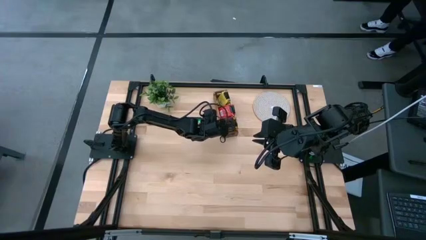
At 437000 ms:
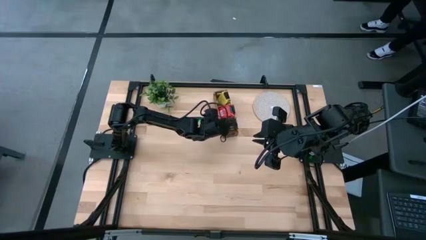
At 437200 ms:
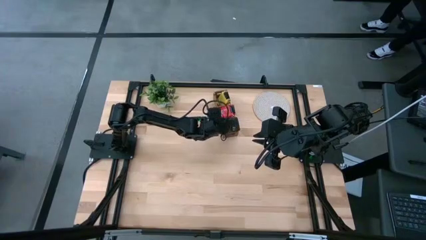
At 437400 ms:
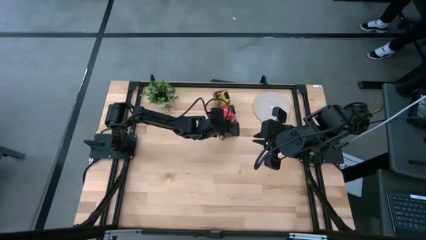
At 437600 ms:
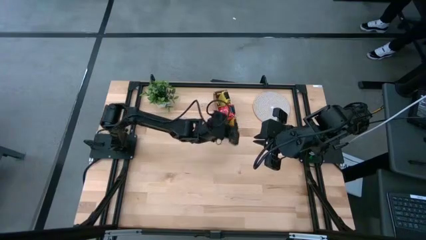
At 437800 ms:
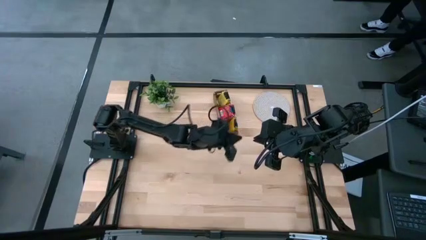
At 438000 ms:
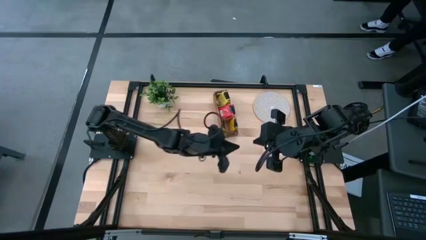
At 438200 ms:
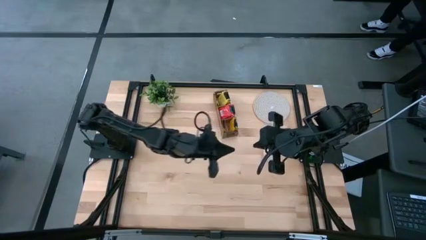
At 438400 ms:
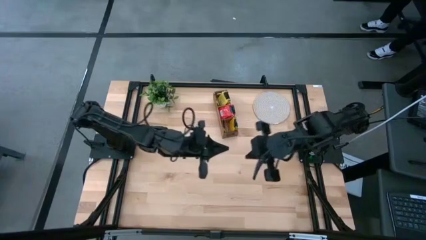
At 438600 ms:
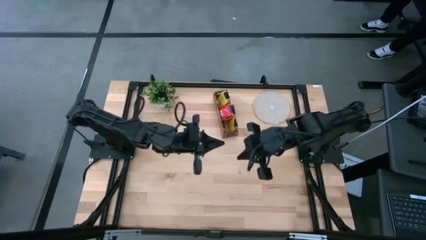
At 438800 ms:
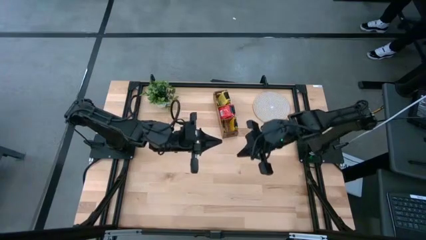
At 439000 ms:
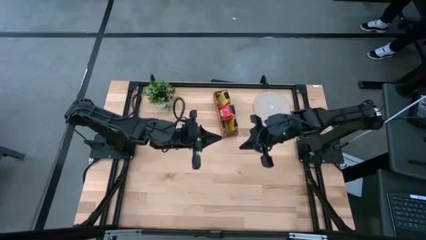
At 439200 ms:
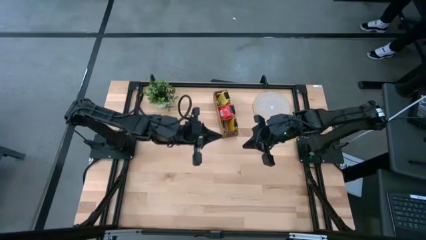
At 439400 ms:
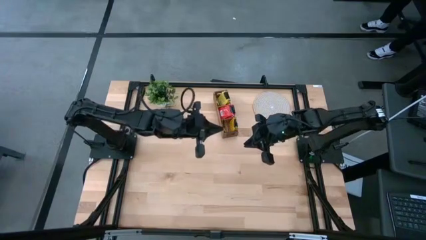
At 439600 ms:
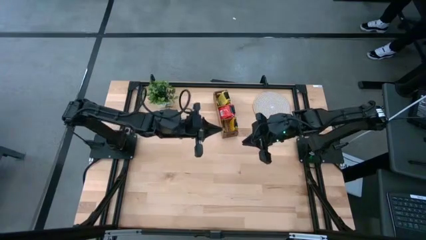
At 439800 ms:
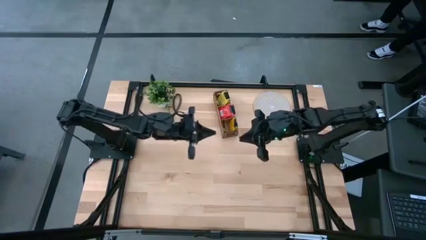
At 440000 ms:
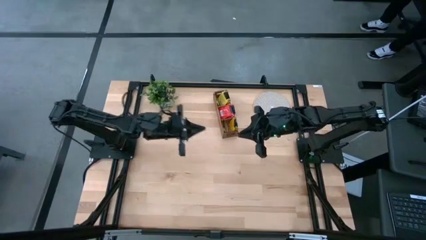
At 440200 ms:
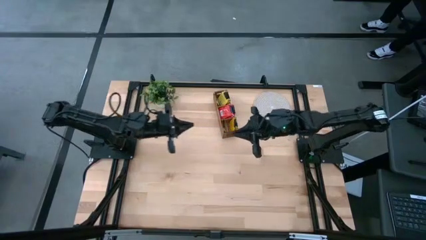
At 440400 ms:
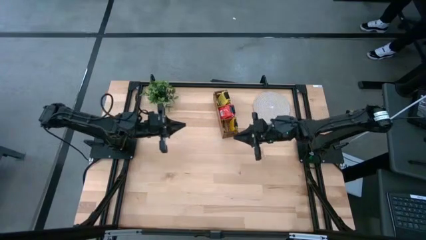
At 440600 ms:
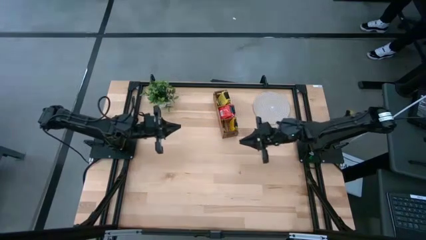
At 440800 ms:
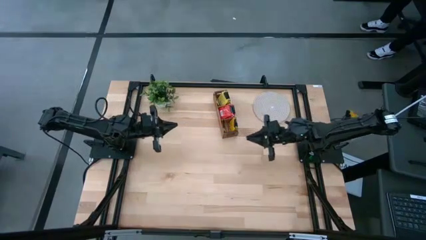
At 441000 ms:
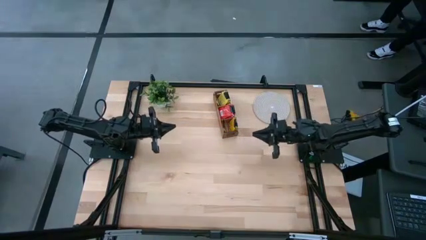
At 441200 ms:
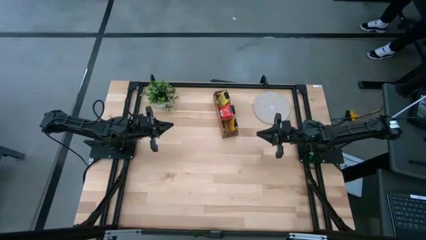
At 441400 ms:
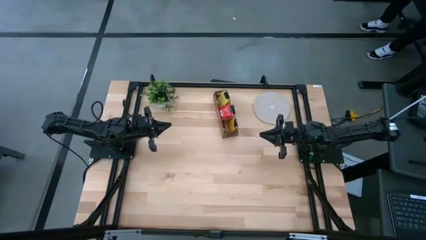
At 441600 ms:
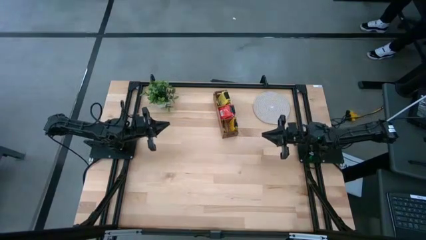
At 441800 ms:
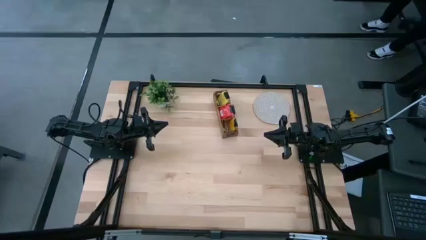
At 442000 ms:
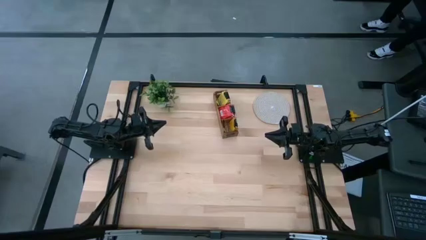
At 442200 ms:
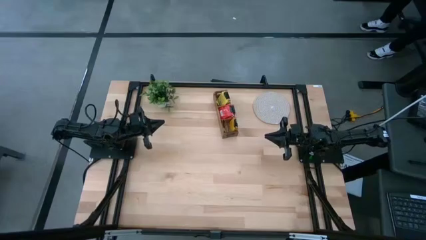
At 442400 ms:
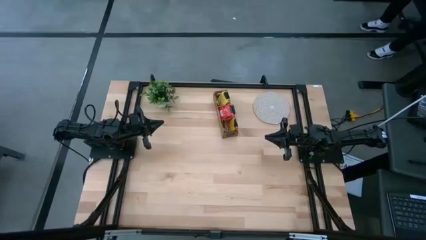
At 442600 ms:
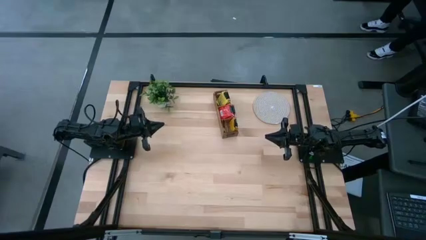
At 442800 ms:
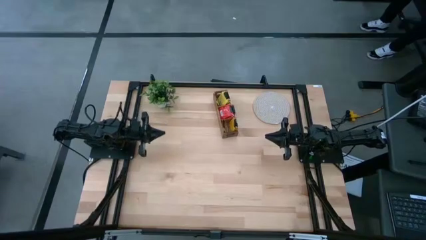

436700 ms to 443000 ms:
Task: Pick & Place Tea
Return to Home Position

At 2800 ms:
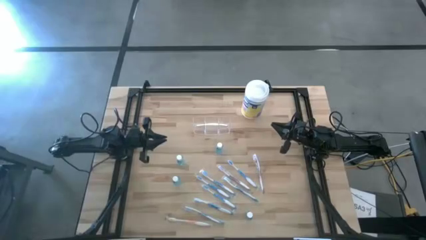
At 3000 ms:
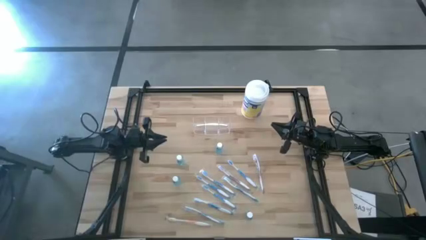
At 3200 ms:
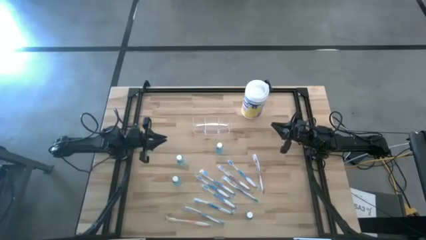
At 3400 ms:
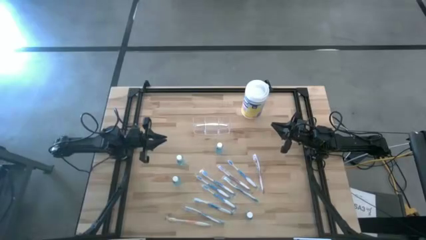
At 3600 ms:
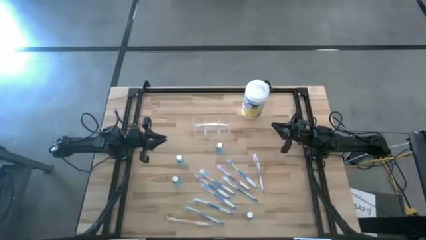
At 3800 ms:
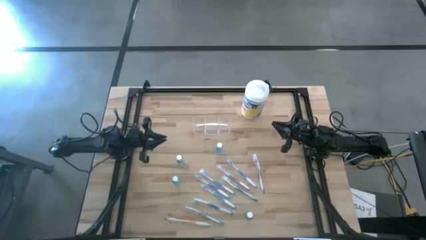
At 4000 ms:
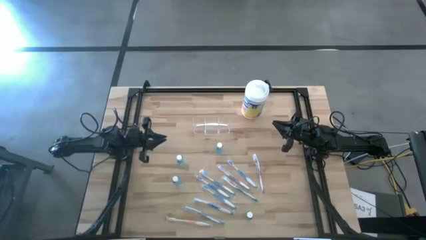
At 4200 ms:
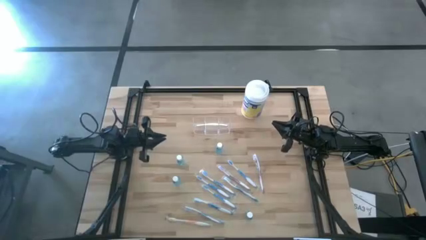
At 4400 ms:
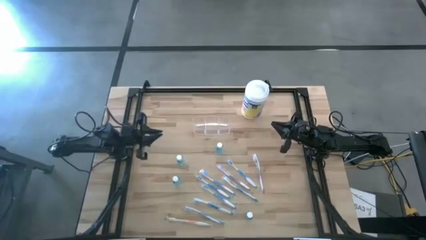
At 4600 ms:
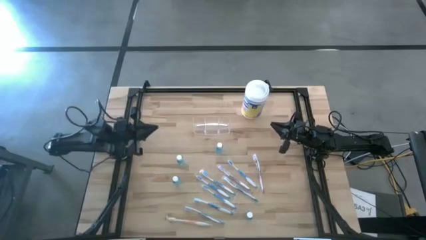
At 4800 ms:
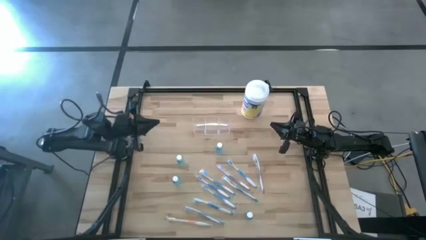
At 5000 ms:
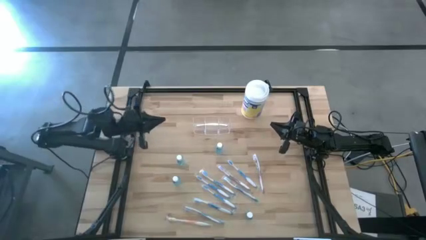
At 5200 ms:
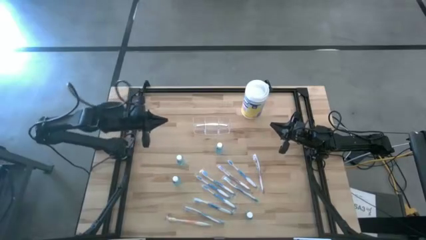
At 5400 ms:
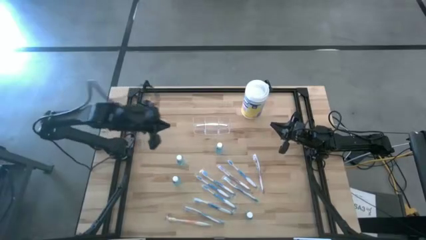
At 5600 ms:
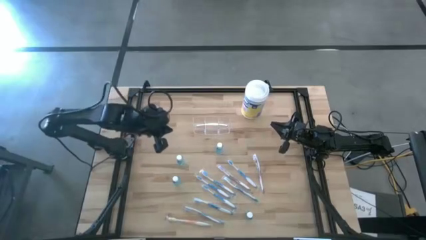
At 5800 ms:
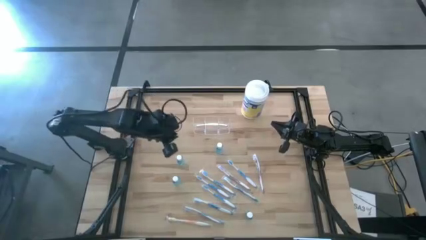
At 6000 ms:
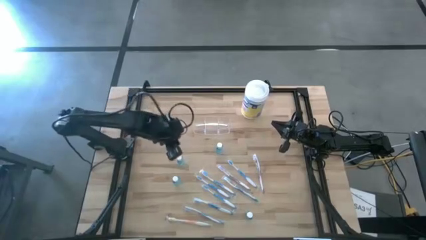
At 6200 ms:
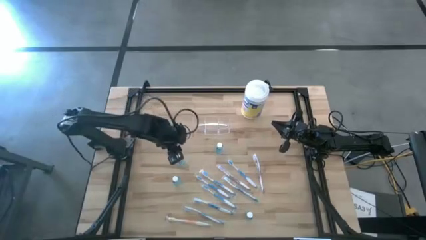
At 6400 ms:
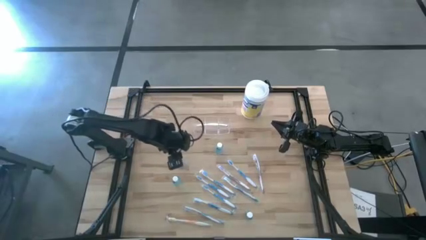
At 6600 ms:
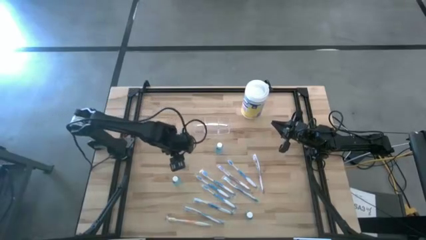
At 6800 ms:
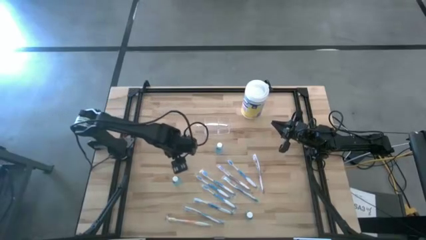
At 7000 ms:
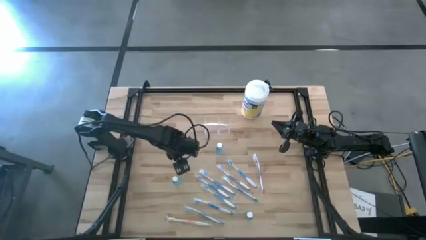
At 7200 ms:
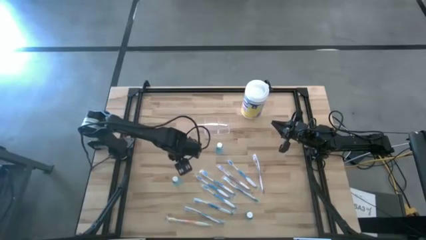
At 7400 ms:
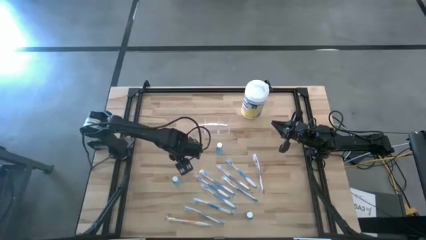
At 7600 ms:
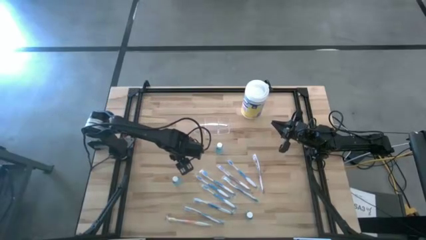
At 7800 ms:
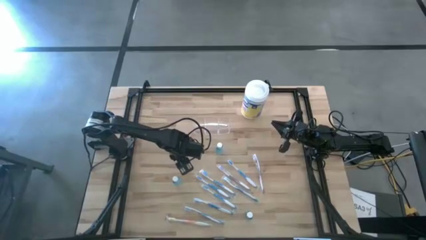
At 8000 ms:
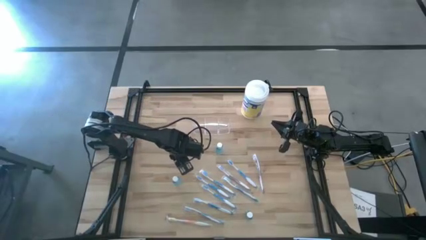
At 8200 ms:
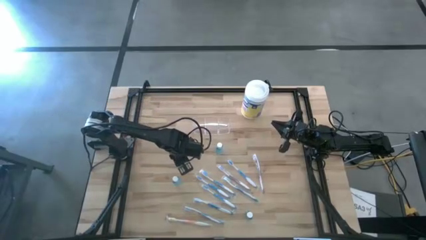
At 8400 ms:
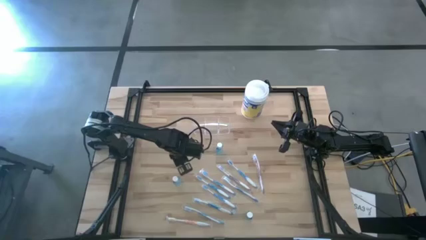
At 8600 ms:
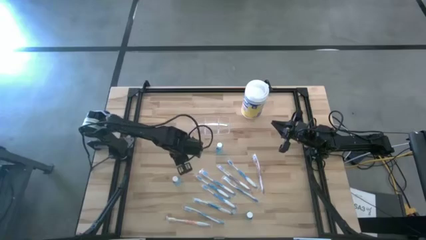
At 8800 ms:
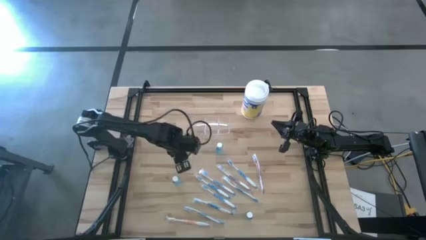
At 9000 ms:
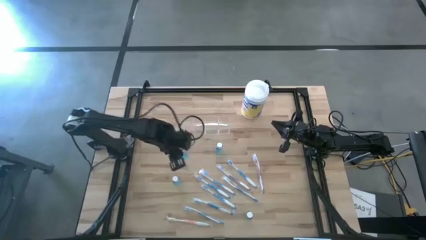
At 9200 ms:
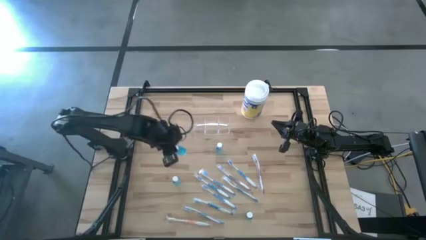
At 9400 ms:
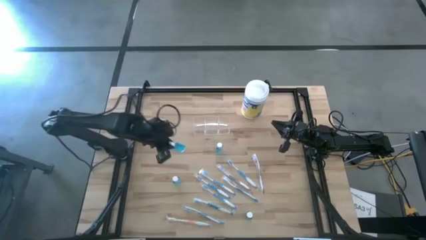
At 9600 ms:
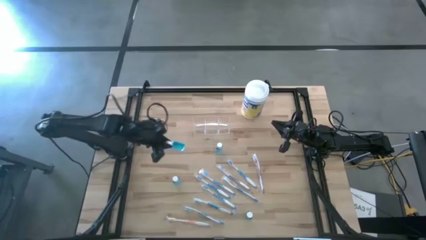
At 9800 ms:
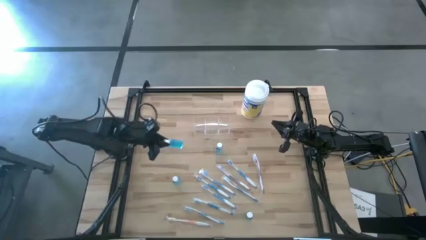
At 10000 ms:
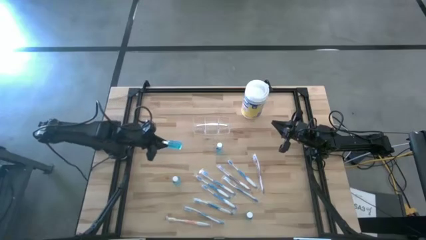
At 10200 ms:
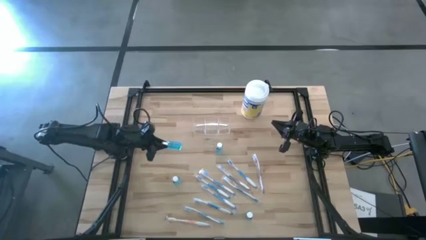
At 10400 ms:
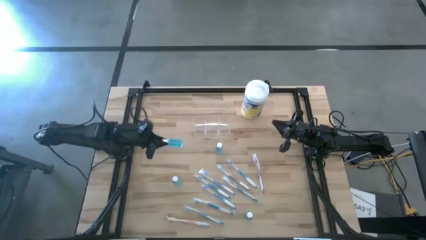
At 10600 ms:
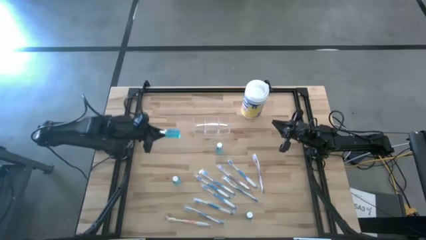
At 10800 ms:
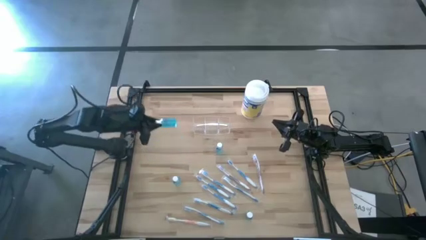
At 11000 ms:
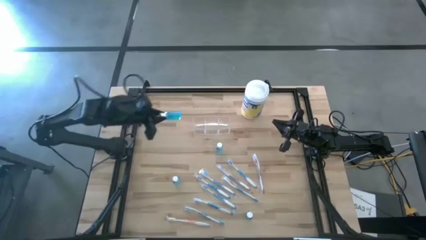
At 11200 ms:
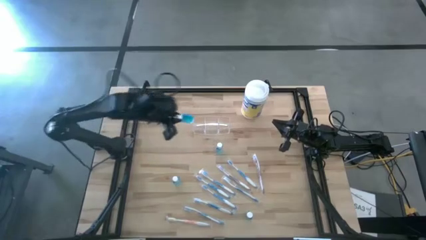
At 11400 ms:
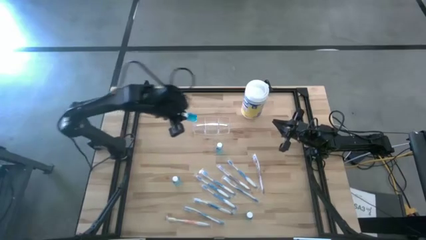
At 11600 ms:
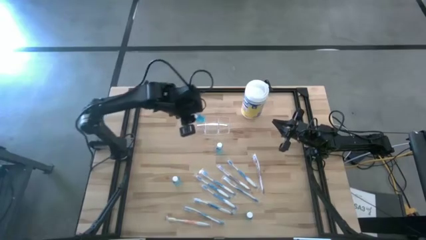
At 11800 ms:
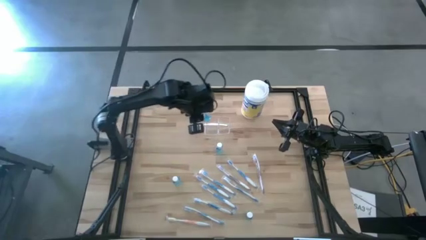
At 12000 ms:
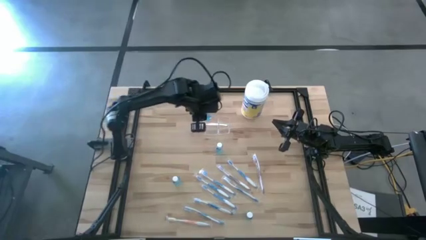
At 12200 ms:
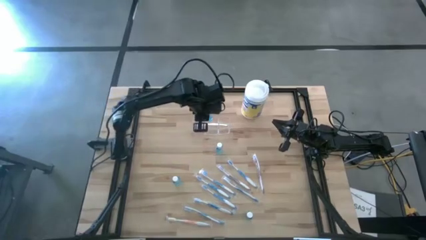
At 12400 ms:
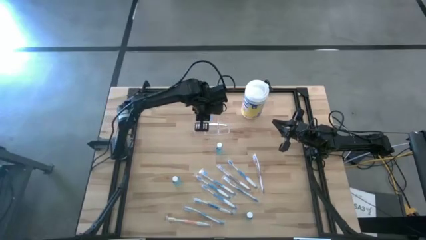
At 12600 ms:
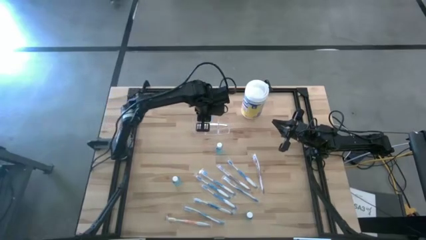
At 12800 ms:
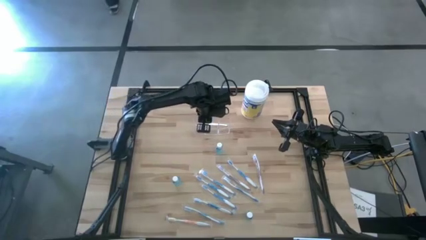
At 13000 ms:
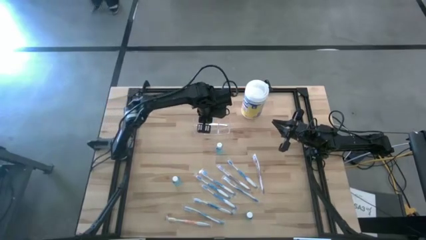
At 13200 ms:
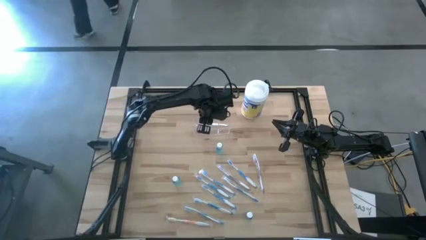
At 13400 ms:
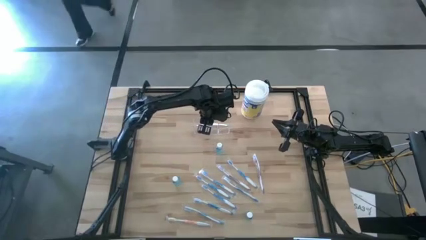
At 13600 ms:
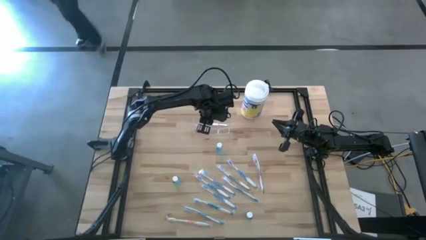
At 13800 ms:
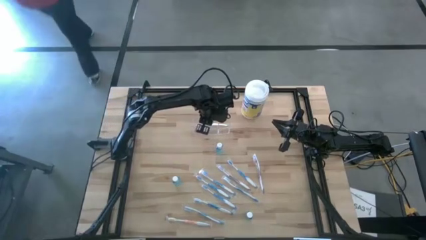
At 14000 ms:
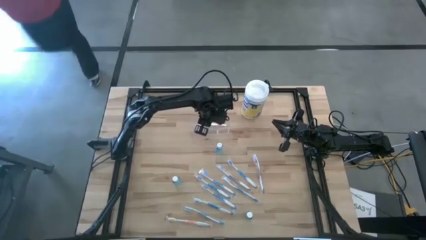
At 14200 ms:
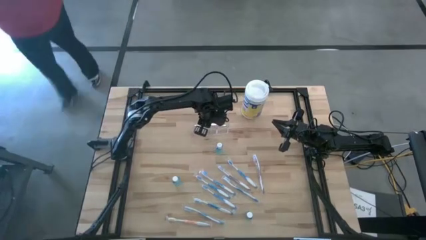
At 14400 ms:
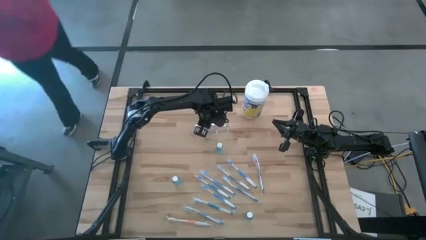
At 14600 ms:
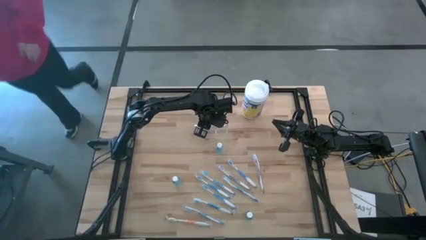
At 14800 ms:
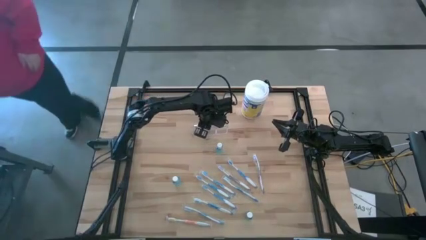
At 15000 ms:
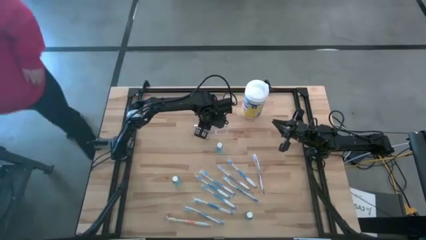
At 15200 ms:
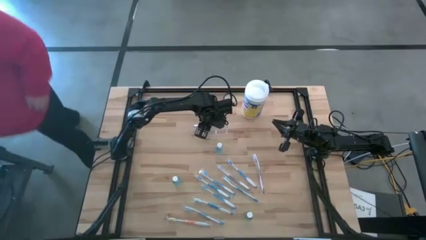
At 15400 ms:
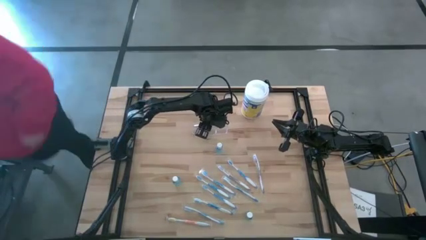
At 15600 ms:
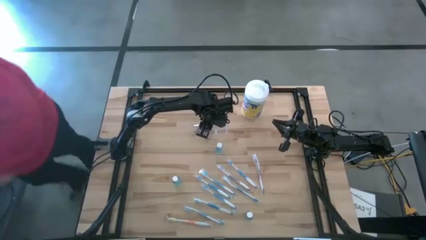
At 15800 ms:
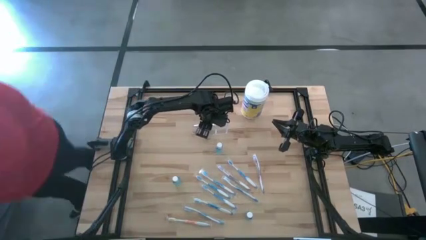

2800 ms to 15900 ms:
Task: Pick & Place toothbrushing station
Put the blue mouthwash into the middle section of the transparent organizer
